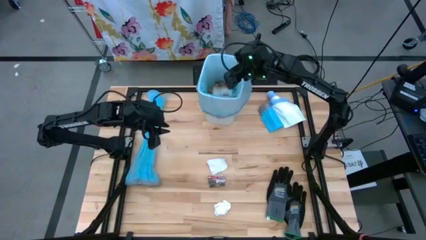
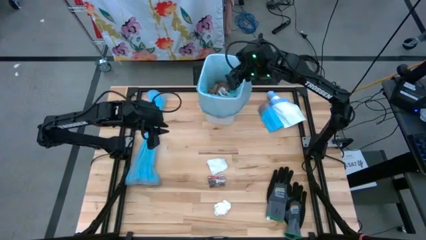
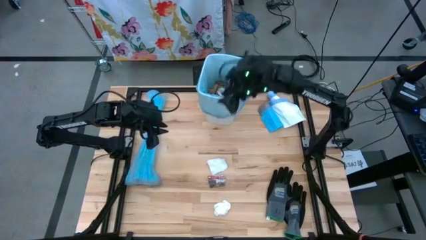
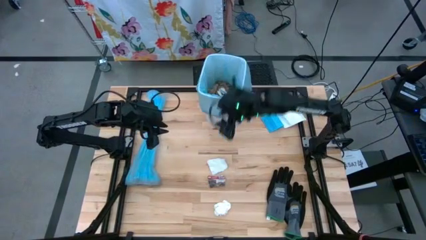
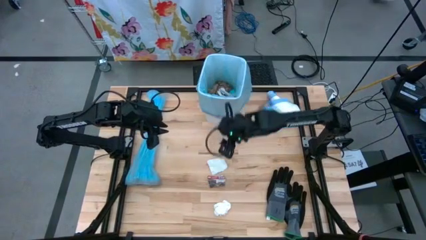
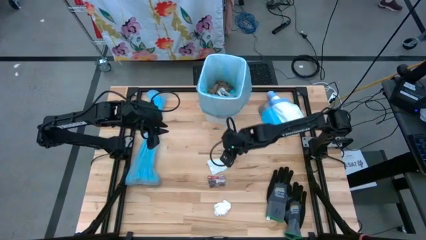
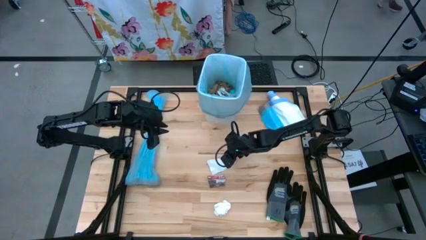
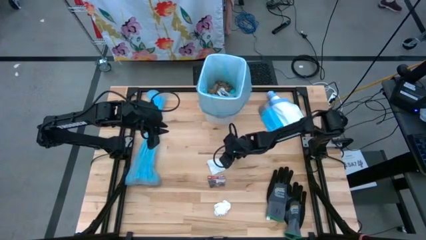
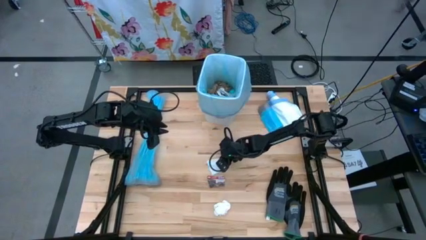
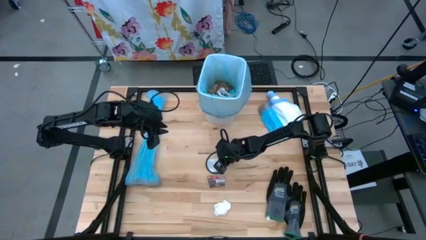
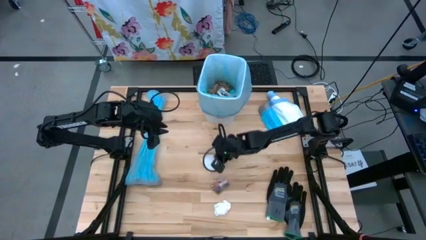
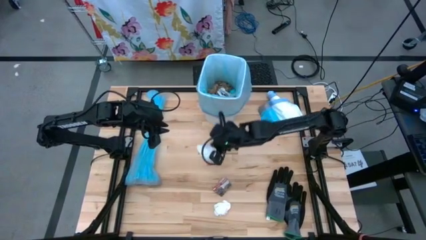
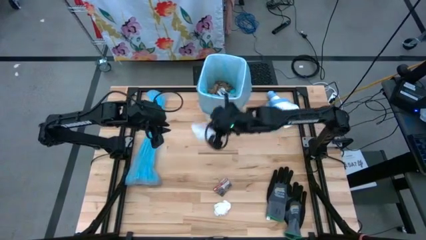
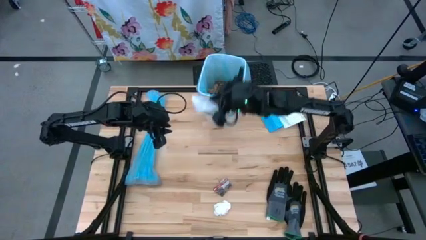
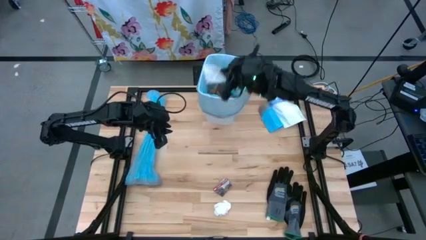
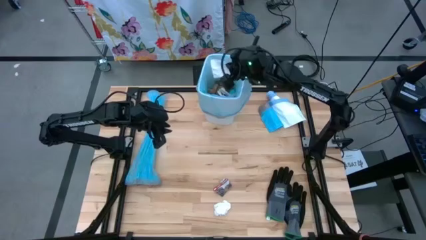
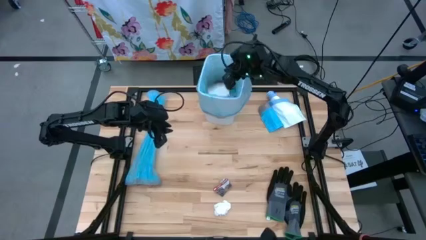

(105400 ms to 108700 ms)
Task: place trash/remove bag and relplace
Put the white paper into the blue trash bag inside the white trash bin

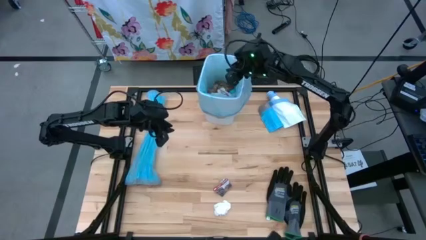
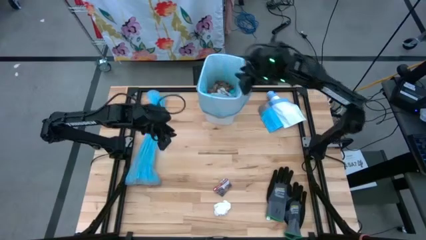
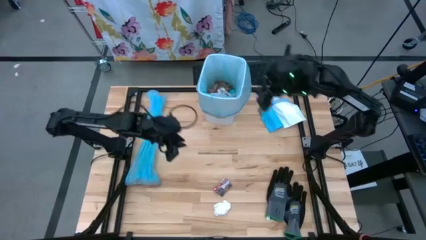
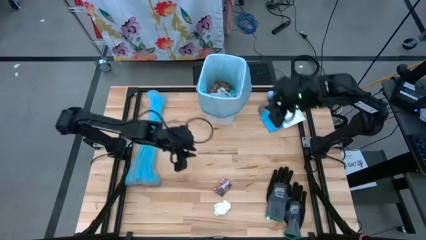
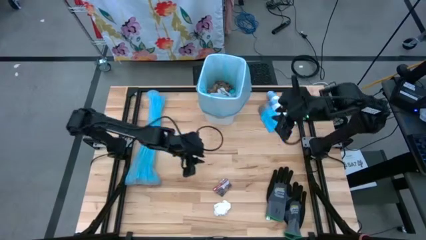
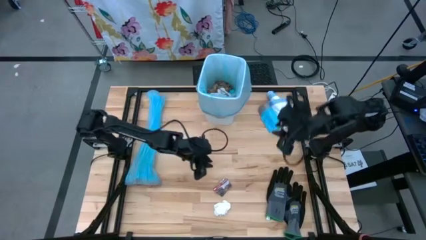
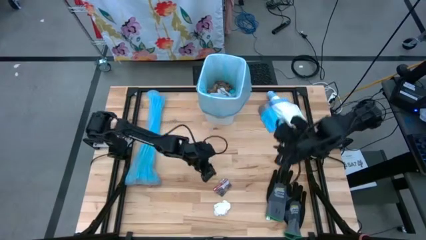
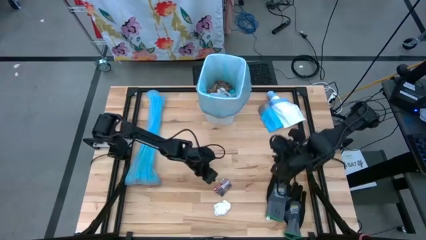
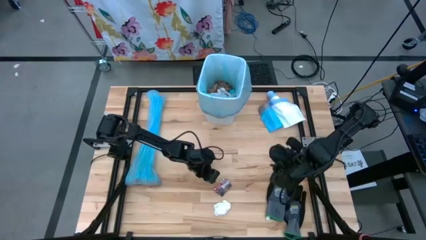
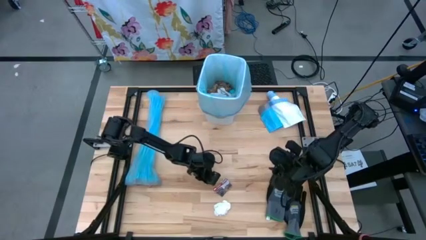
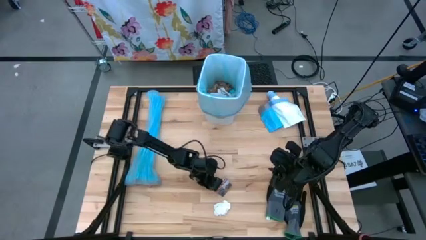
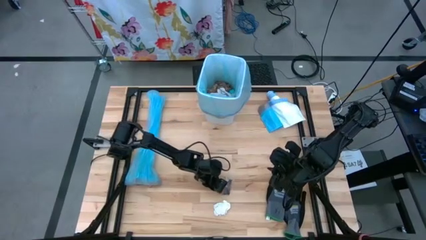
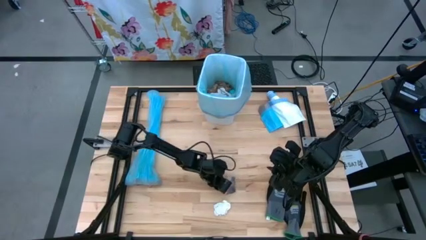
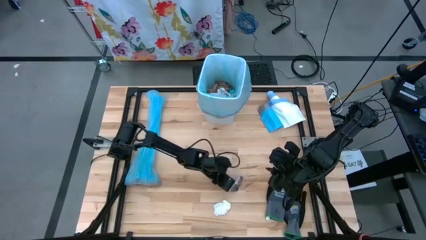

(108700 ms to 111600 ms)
Put the white paper into the blue trash bag inside the white trash bin

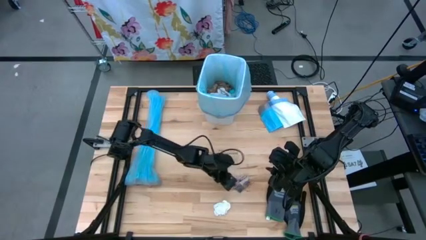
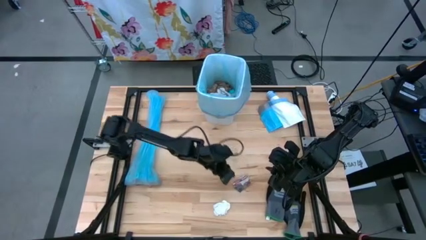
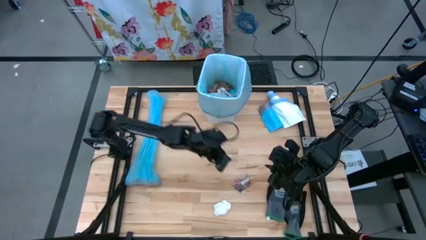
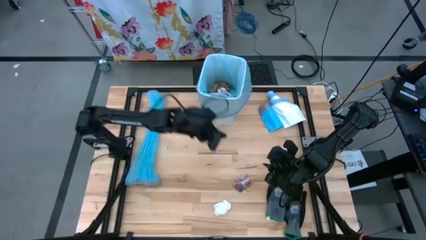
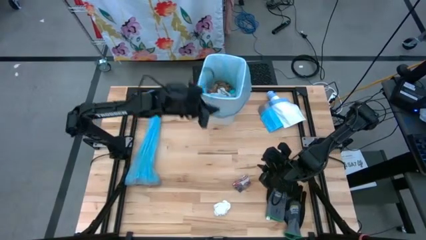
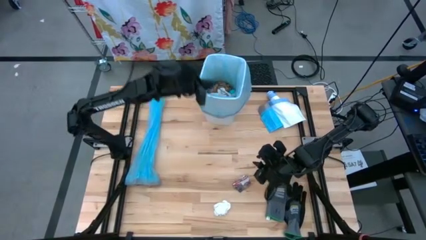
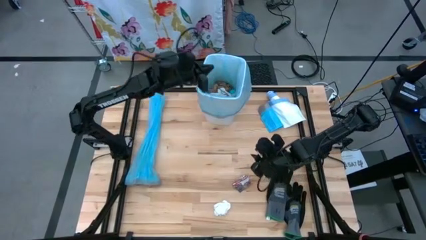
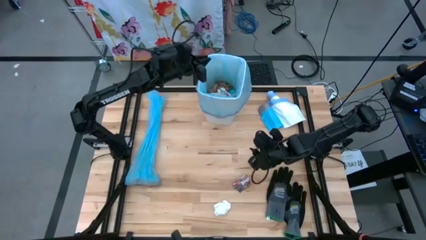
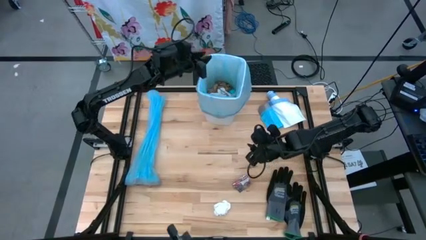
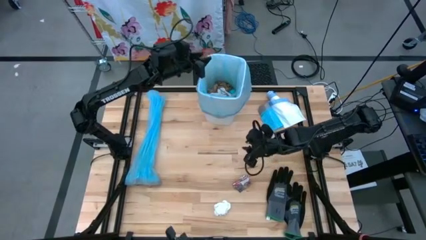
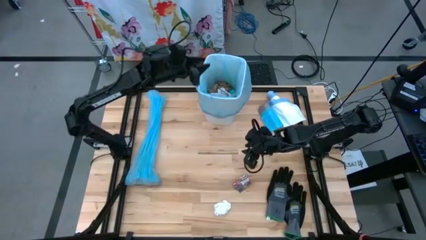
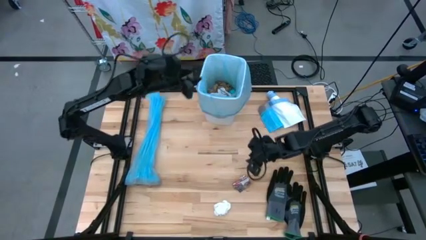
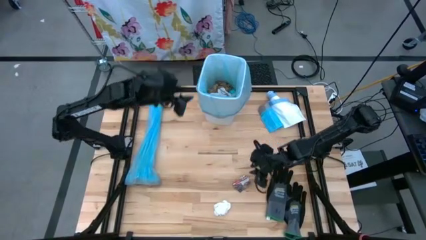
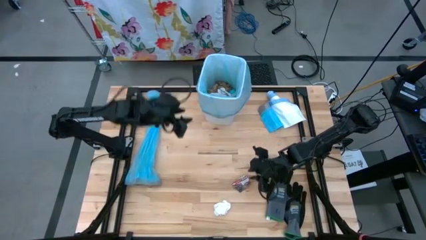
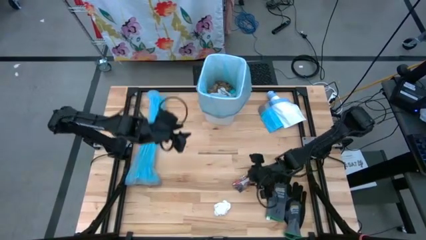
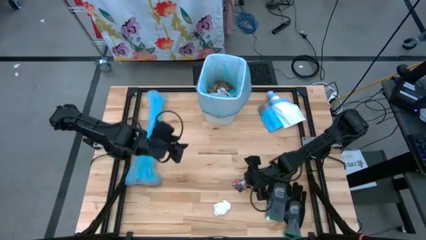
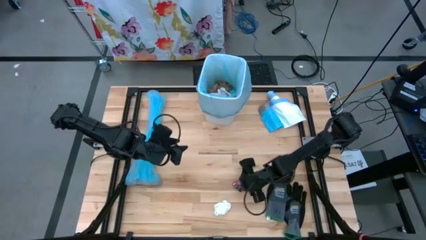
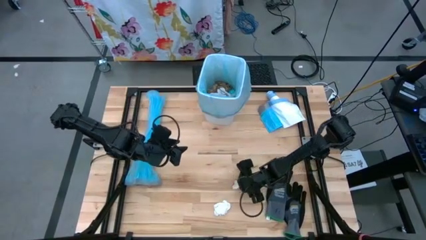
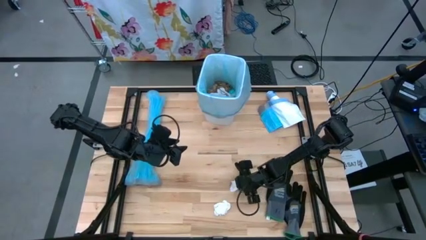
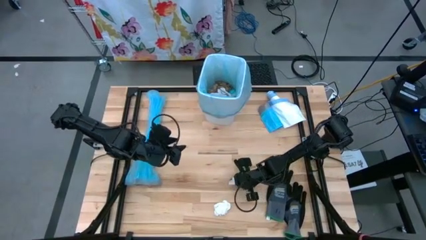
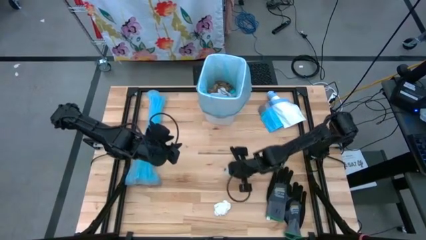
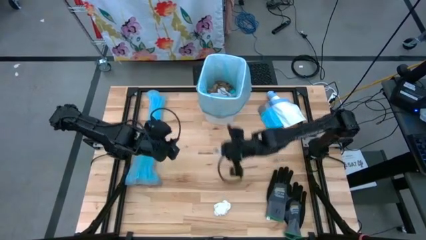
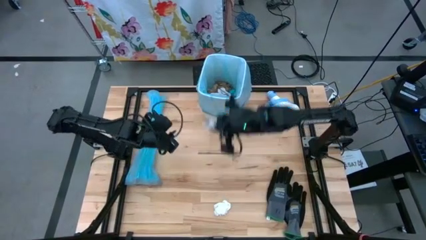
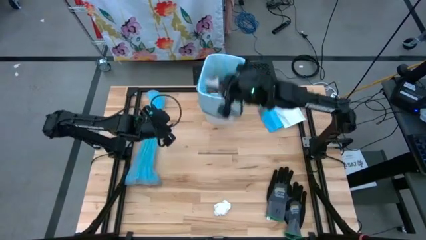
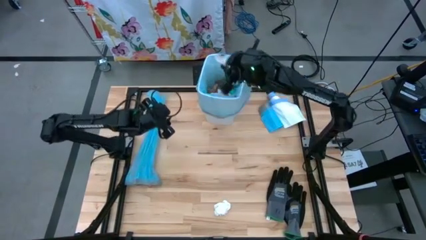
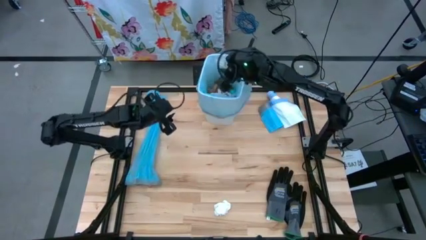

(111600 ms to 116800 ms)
Put the white paper into the blue trash bag inside the white trash bin

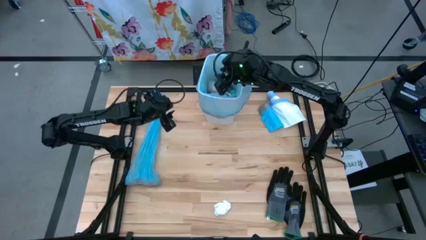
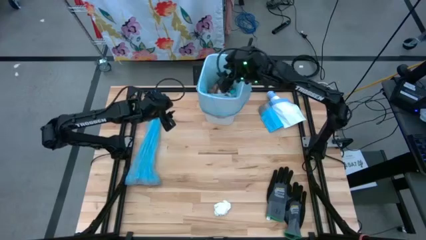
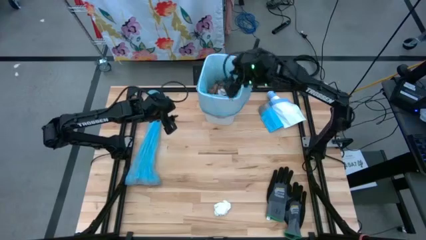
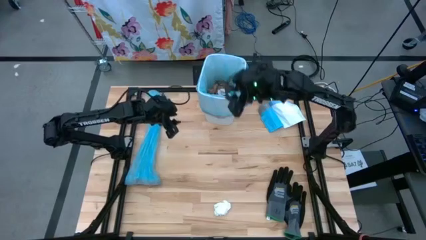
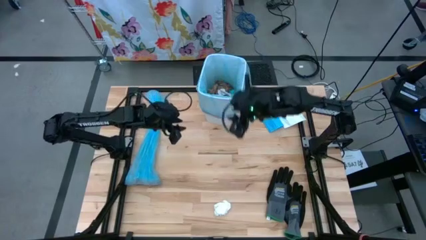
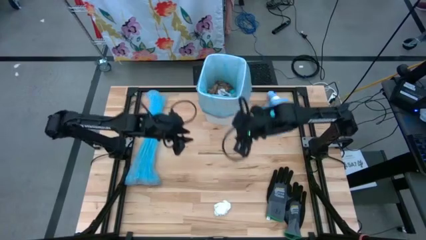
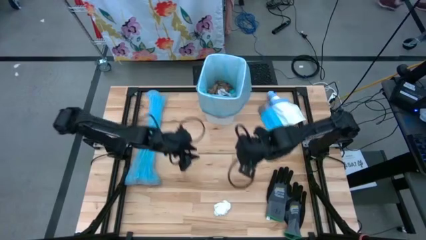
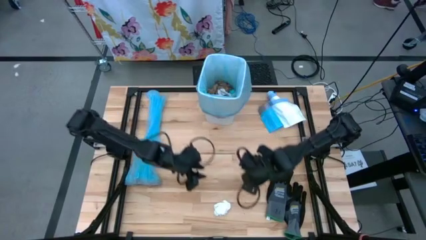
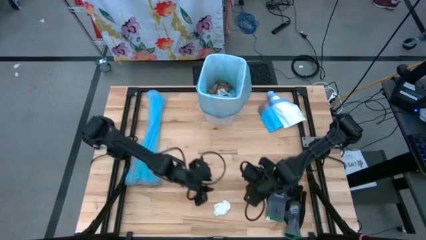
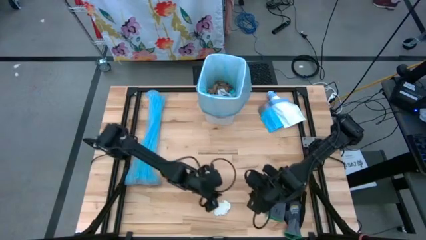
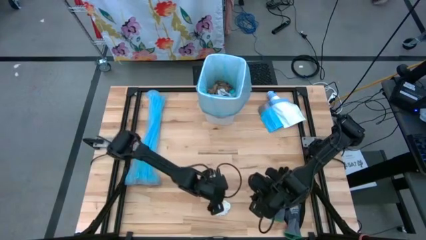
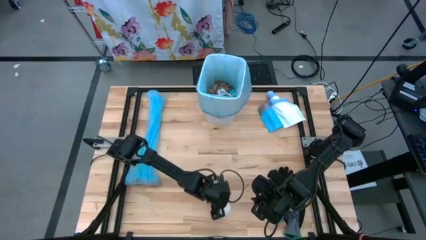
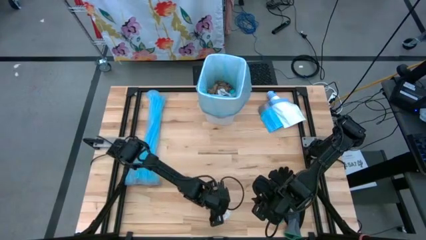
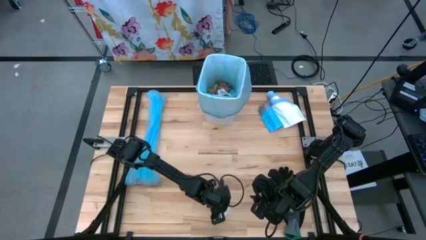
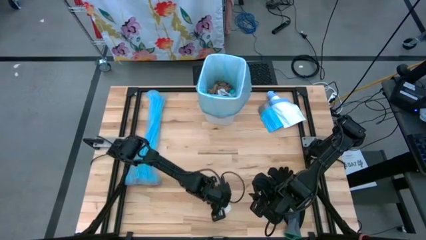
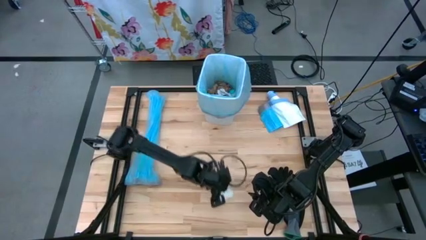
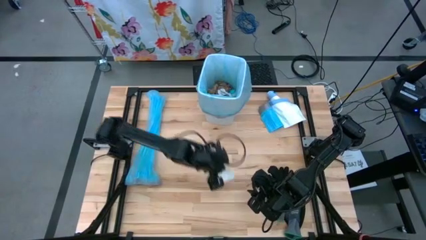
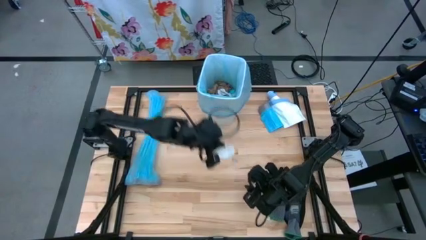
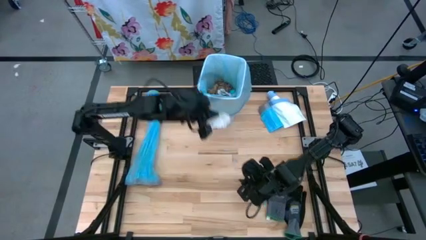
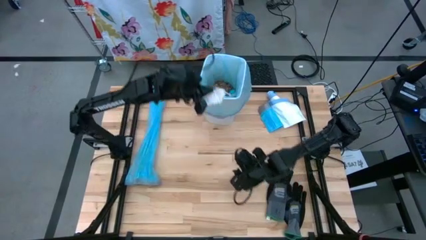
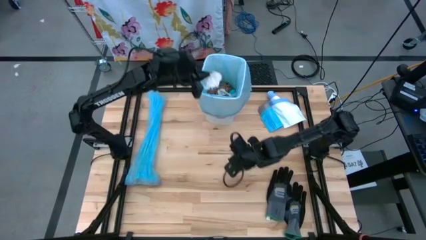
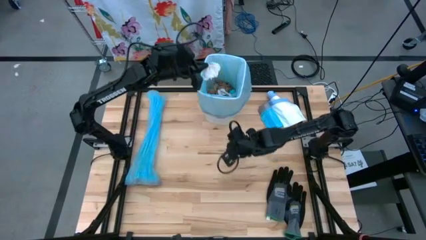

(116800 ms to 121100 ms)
Put the white paper into the blue trash bag inside the white trash bin
